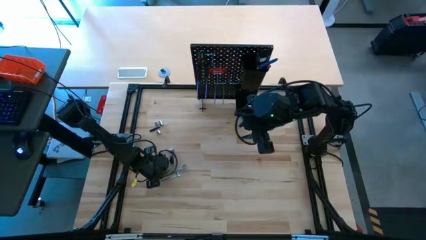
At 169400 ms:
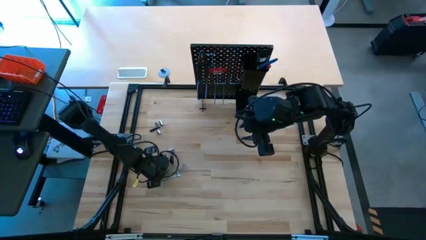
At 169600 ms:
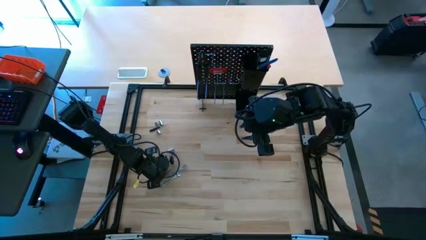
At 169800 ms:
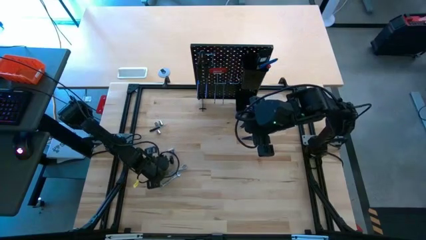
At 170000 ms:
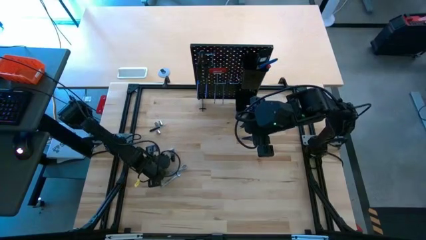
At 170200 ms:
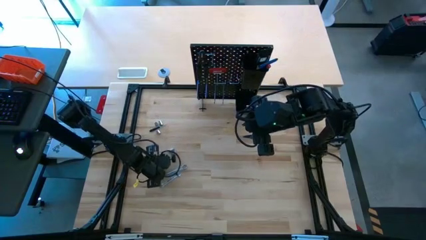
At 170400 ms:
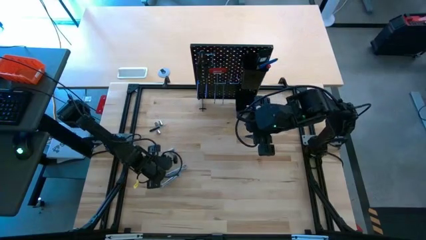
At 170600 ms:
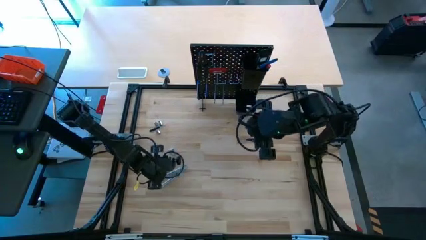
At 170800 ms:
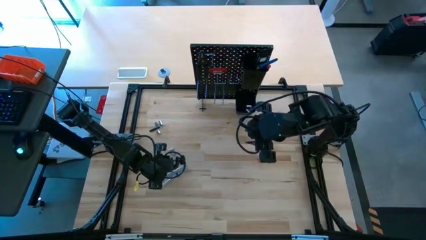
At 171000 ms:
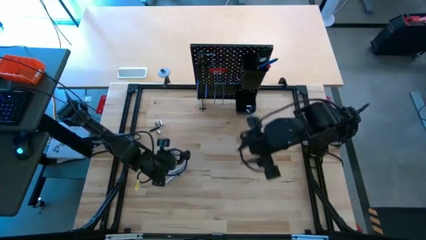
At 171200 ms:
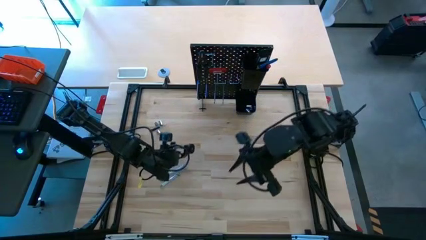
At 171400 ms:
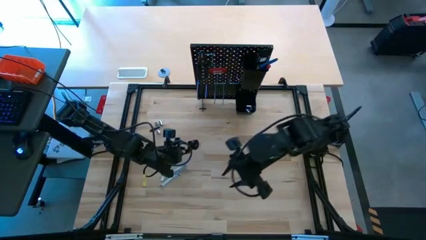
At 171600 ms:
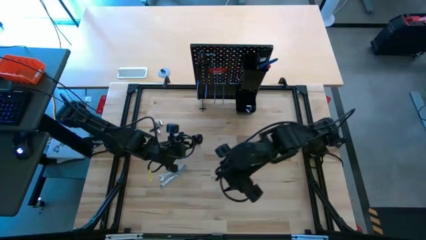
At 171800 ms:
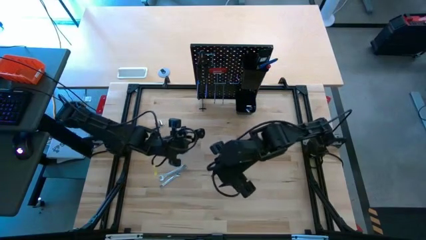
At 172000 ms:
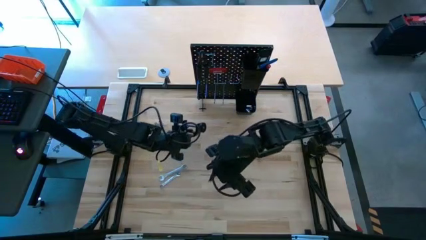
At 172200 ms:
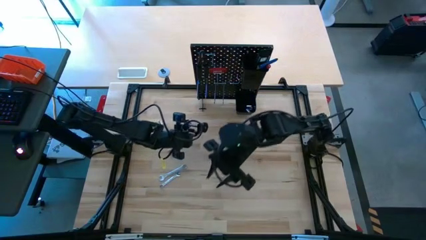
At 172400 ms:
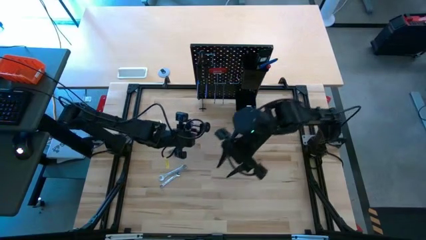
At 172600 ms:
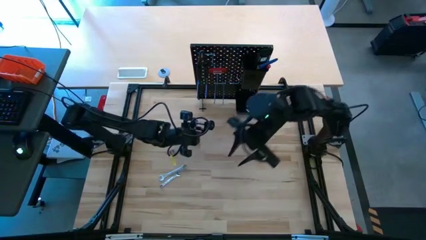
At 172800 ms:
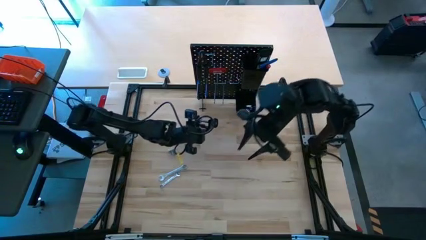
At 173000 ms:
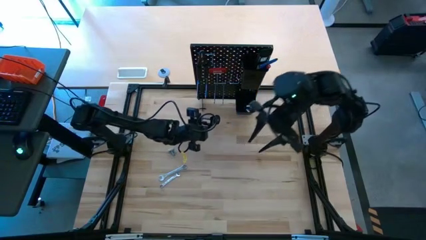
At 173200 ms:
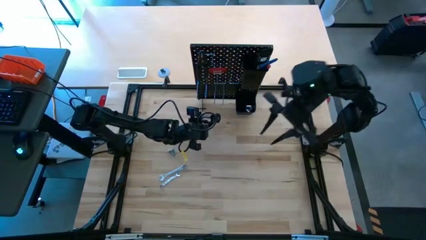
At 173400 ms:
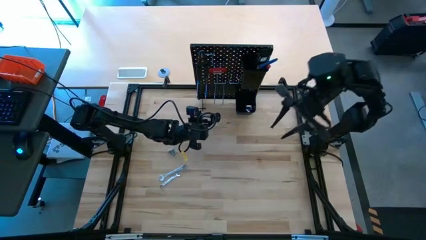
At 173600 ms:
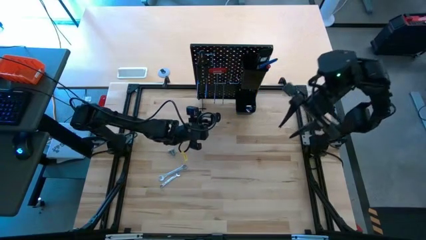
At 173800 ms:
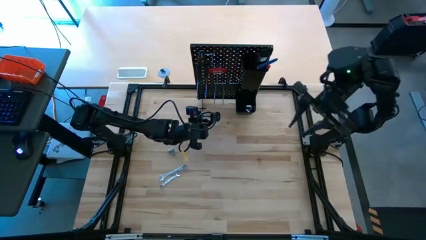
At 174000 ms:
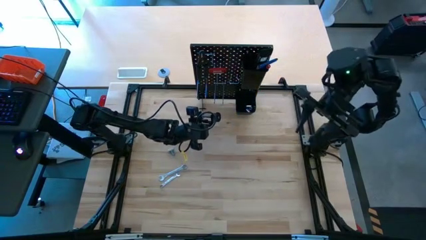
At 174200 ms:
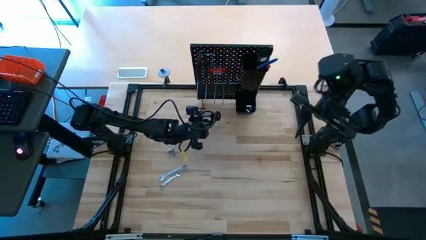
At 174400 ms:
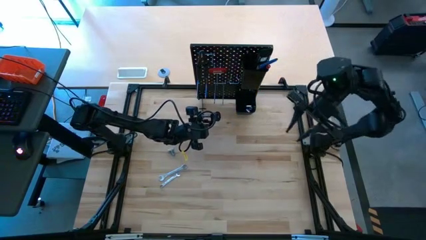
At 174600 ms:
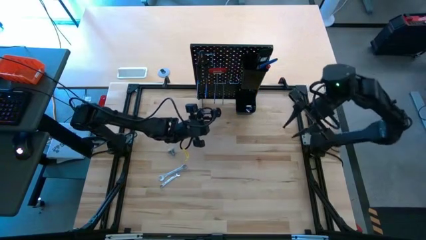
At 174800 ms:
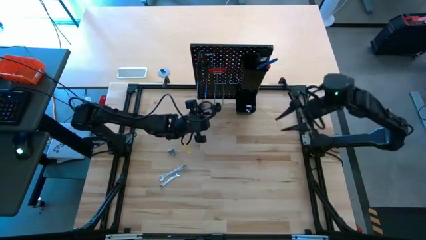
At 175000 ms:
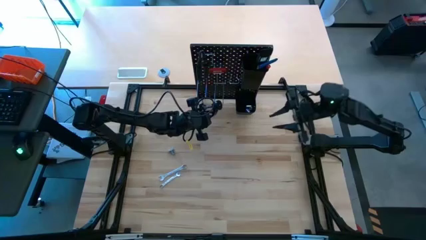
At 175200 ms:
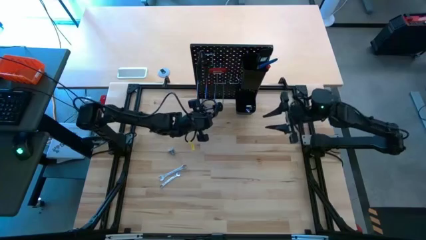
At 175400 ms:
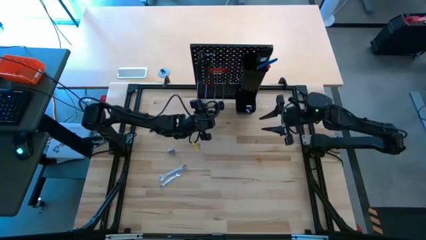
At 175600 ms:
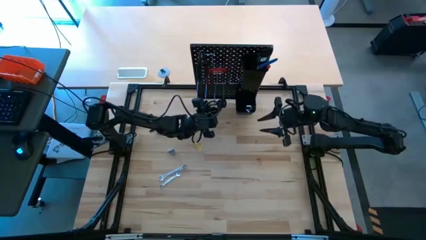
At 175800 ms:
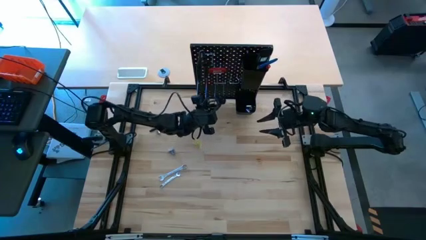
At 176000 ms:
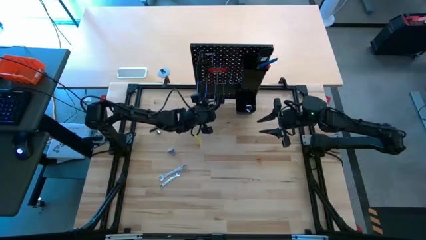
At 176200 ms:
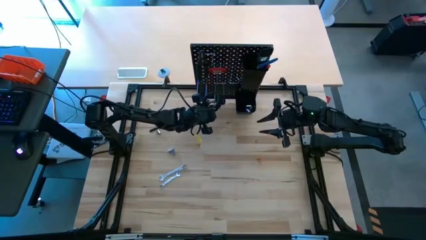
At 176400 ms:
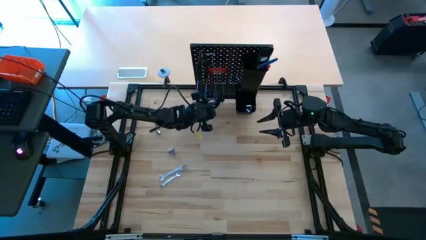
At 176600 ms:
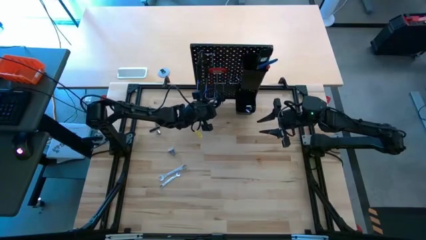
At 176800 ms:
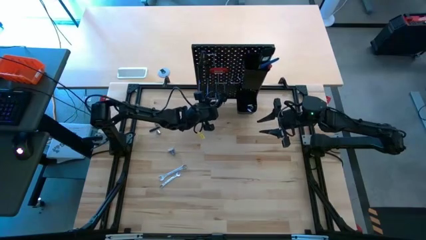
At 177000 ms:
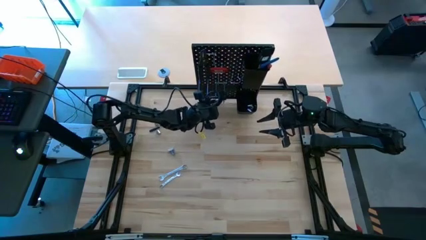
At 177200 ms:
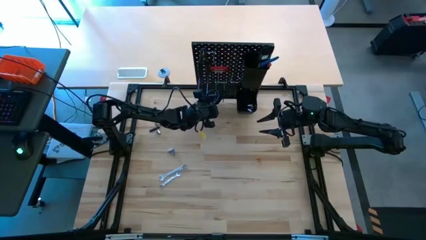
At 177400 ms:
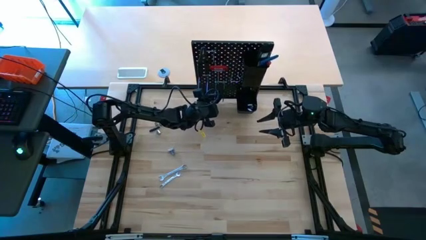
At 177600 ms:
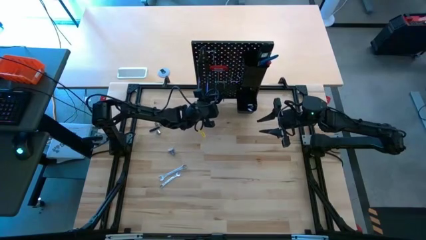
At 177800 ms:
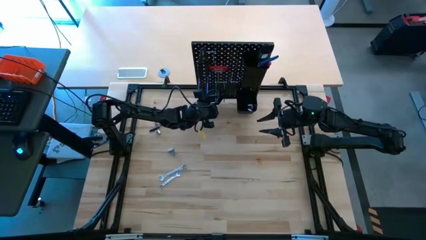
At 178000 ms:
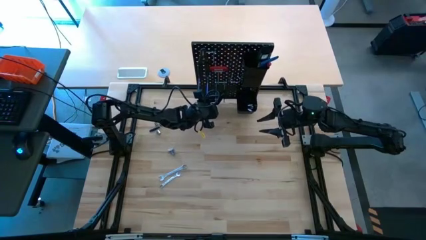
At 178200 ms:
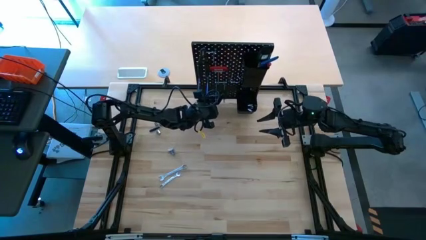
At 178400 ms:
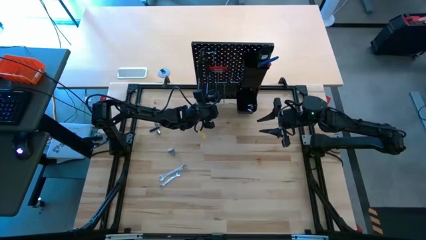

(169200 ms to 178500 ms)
Task: Hang tools onto peg board
Hang the c-clamp on the peg board

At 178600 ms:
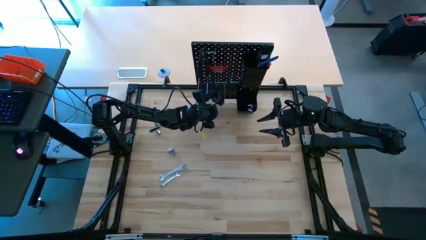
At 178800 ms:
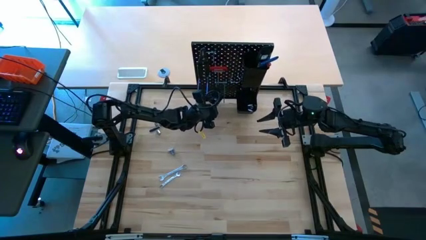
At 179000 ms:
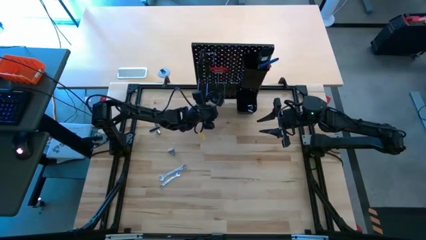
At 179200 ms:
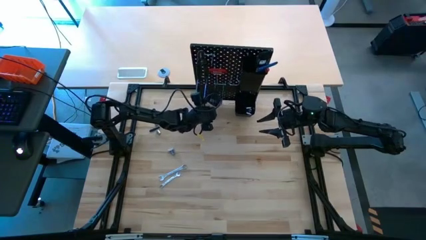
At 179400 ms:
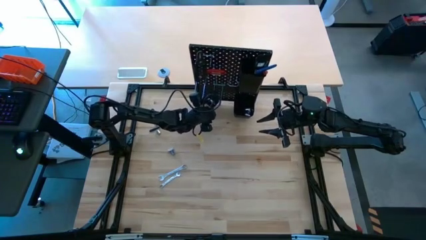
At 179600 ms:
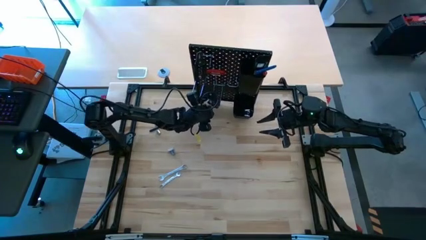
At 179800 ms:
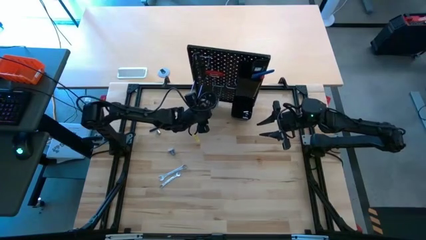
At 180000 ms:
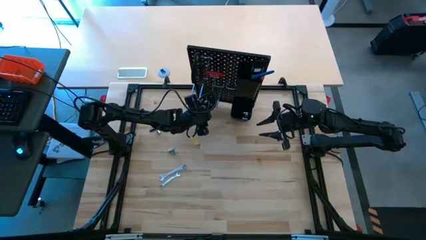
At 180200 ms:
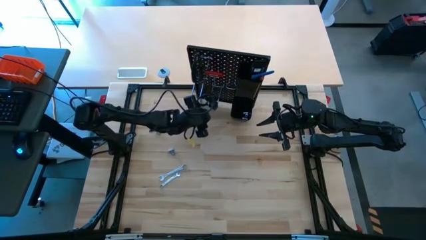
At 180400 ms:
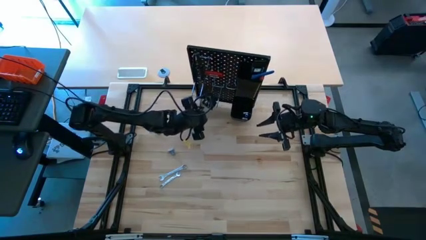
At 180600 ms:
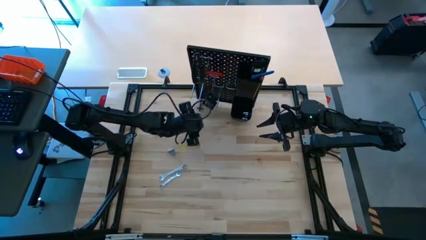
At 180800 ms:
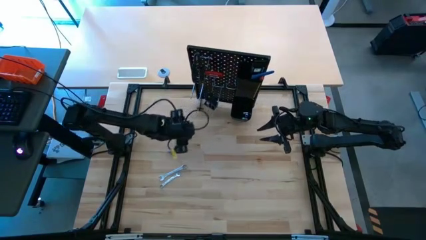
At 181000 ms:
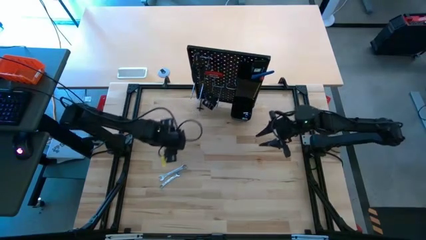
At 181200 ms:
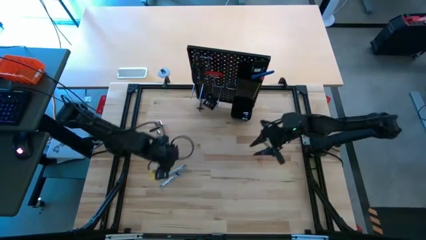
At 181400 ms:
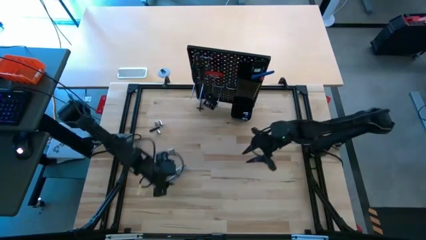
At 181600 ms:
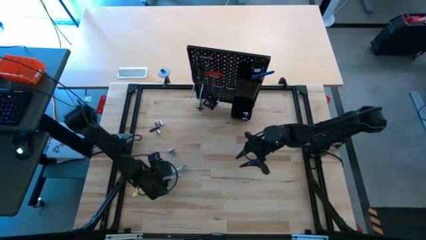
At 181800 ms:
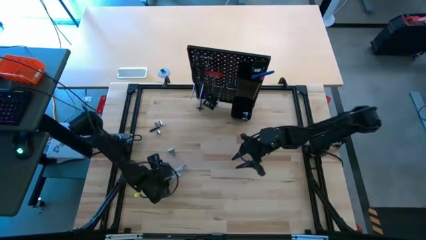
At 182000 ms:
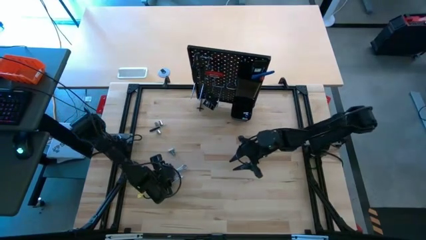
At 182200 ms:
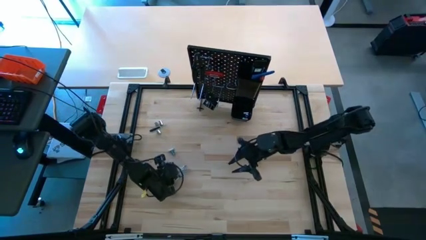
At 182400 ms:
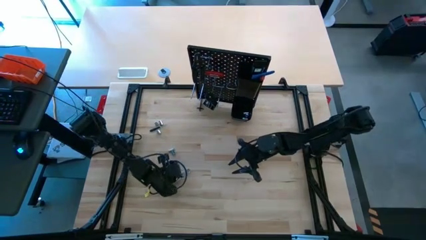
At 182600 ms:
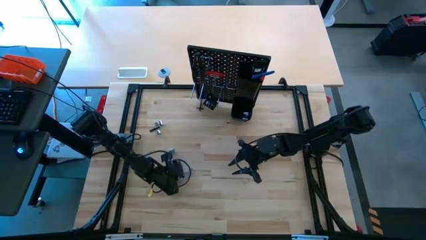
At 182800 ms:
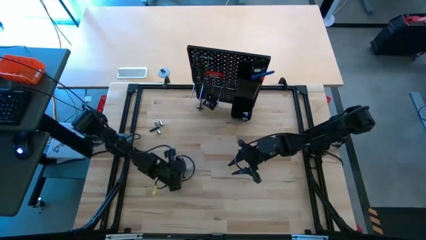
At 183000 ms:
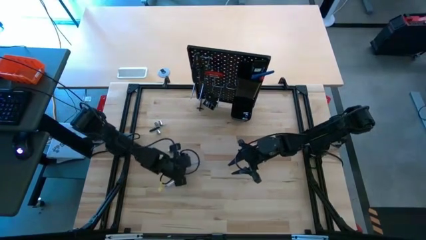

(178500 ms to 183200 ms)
Hang the wrench on the peg board
